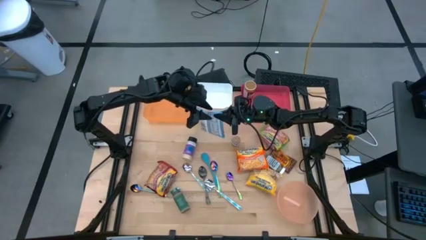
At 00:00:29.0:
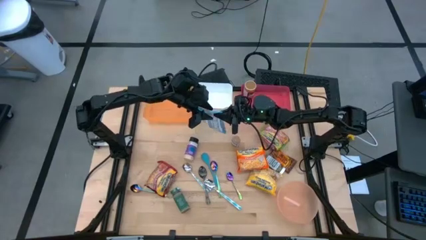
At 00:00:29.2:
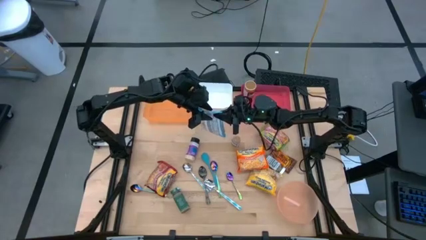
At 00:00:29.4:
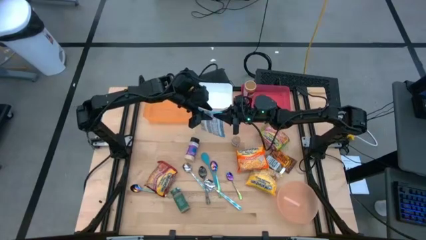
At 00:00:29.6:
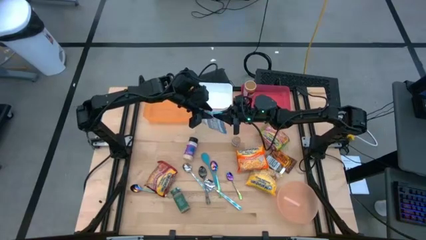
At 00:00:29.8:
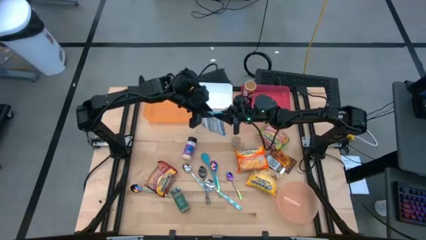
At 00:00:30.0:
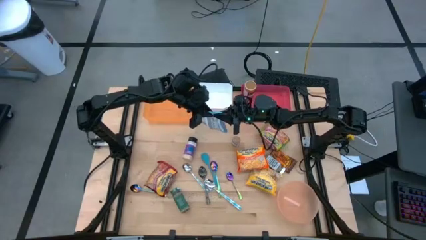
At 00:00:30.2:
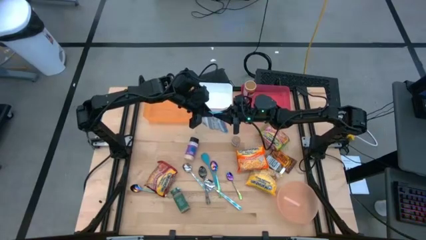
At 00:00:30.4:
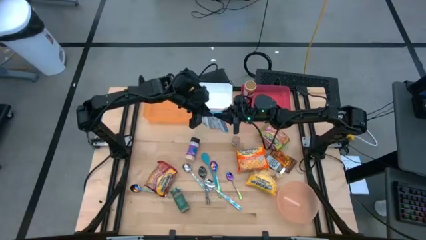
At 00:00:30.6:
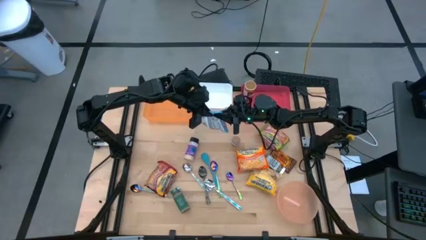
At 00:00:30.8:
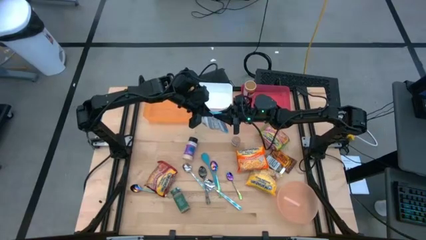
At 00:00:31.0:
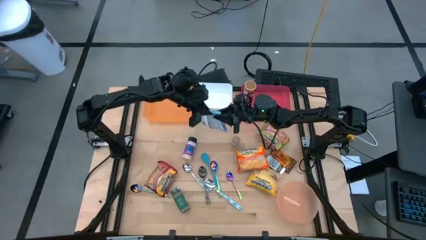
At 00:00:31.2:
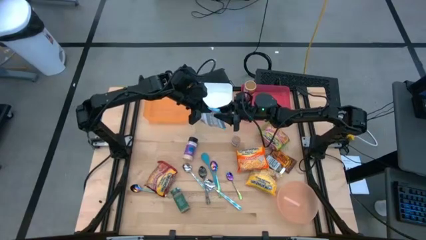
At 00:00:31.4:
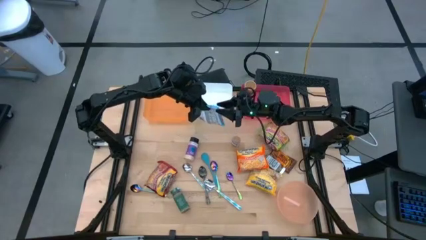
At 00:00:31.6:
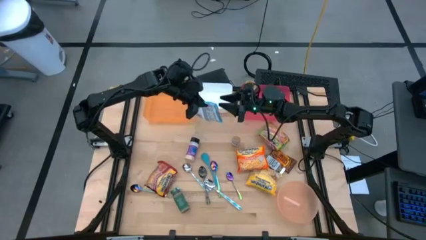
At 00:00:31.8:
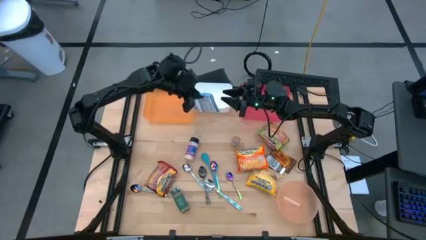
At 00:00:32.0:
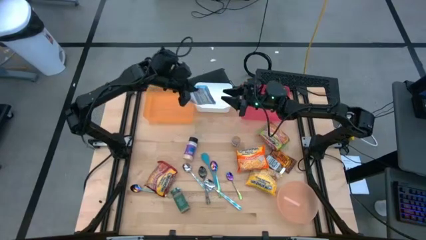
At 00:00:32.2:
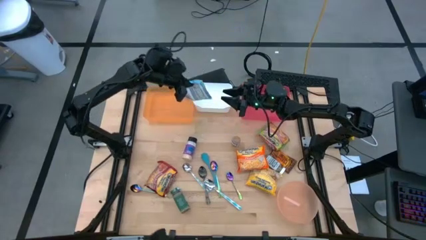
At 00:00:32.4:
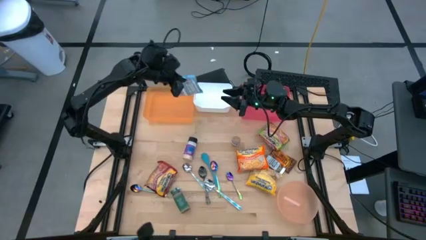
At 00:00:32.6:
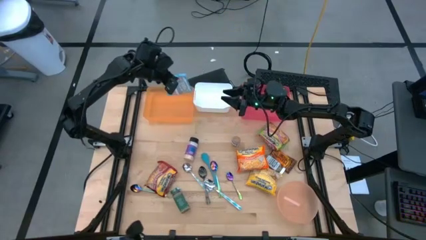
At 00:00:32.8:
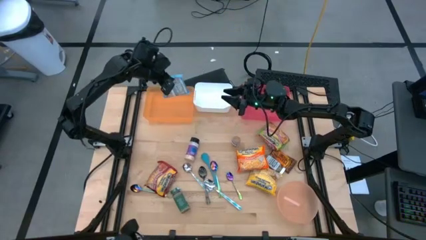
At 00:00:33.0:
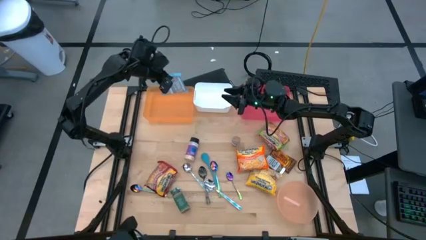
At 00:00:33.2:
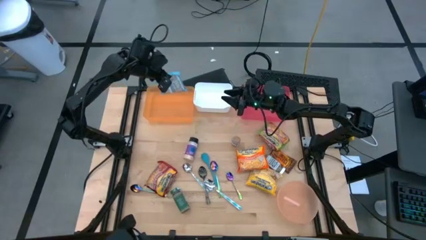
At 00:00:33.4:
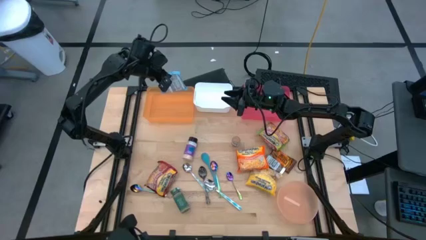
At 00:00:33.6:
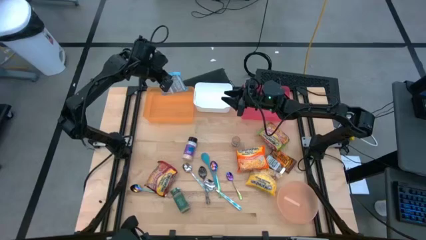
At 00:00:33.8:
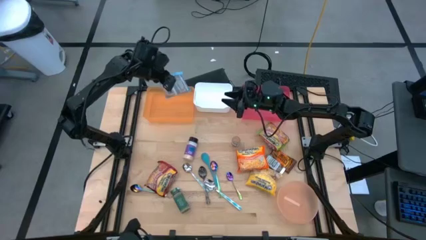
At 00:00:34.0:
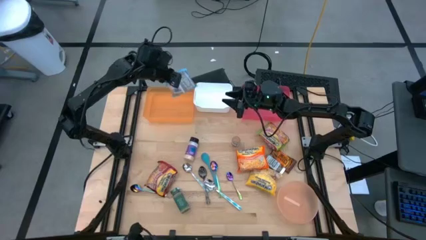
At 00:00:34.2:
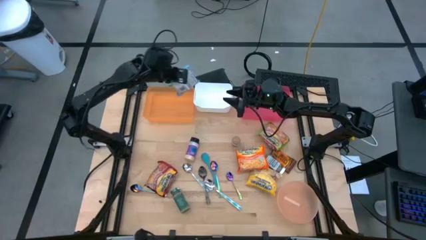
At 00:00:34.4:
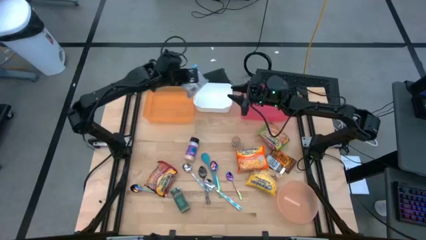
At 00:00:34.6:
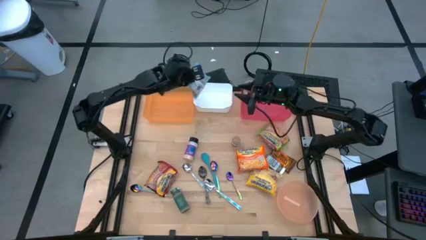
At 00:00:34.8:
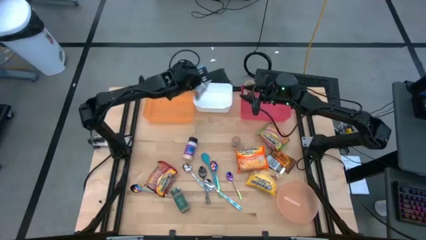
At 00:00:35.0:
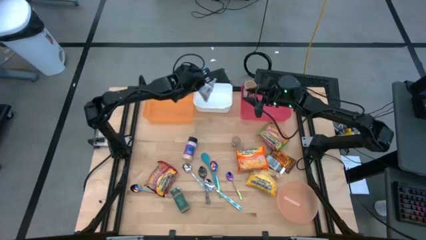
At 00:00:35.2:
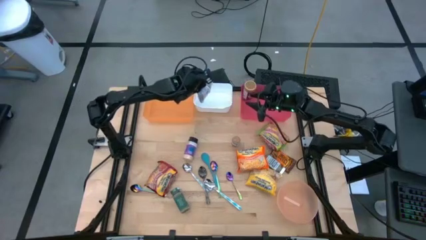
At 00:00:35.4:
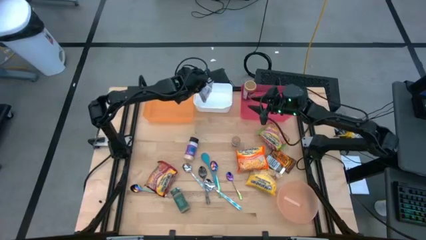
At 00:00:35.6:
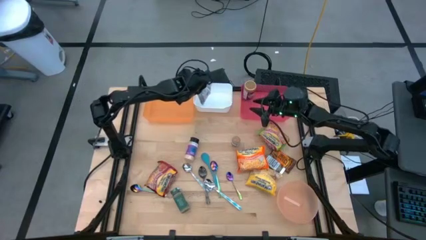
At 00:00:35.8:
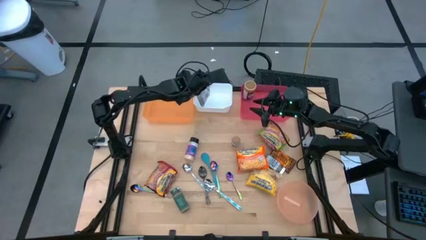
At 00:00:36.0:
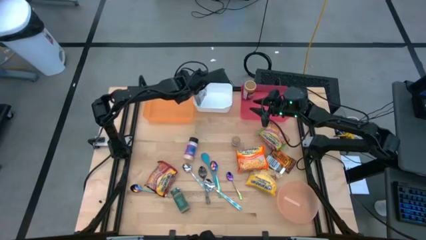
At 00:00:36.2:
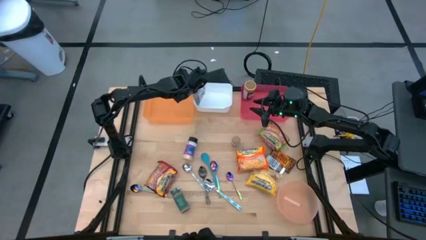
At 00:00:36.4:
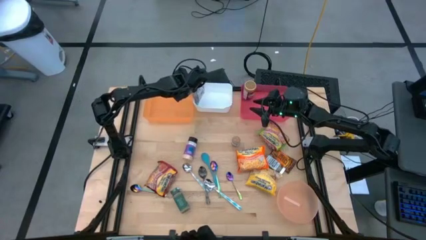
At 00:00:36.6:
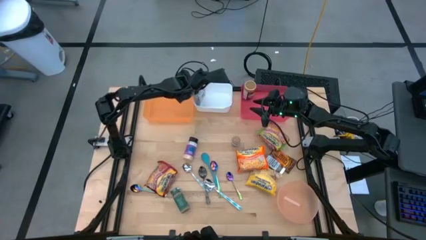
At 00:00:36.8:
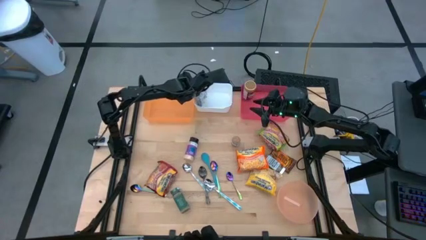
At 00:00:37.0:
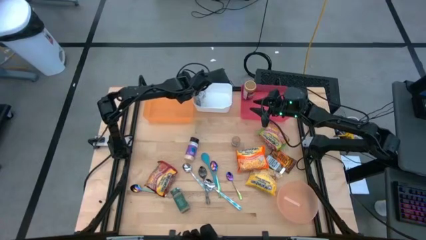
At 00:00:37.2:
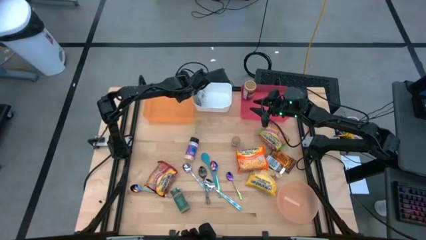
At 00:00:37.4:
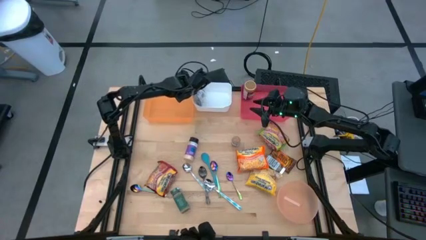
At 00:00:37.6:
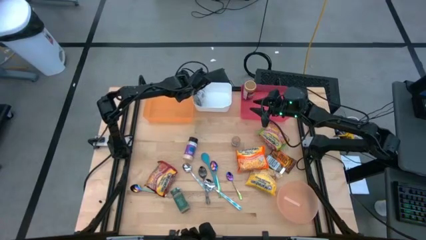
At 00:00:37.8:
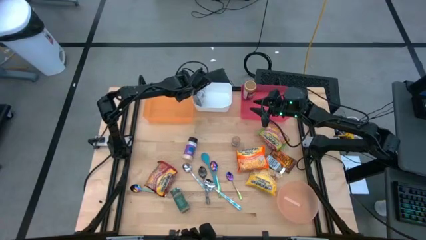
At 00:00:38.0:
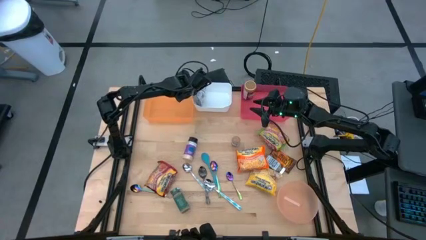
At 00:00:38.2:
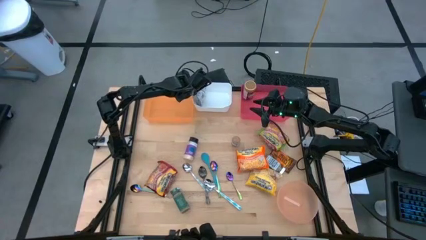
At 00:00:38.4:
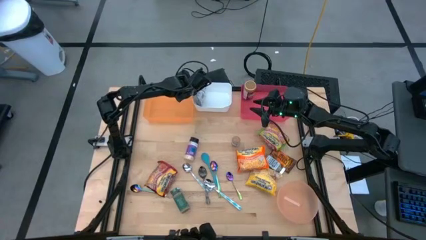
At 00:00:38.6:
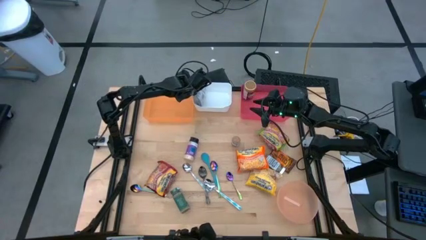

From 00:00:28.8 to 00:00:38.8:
Task: Pick & Place Food Item
Put the blue noodle pack into the white bin
